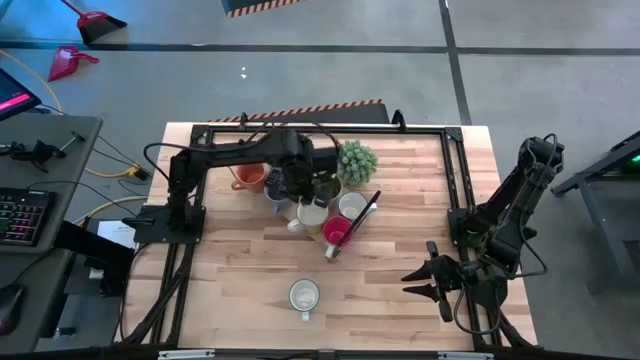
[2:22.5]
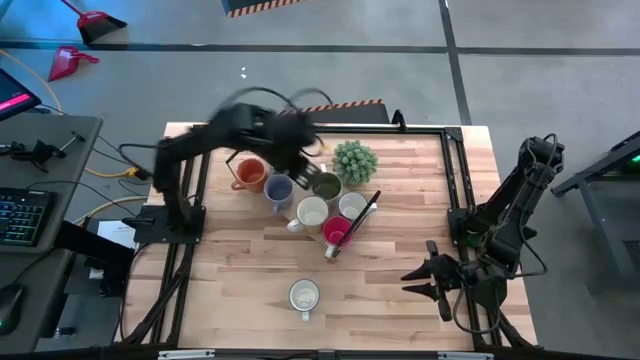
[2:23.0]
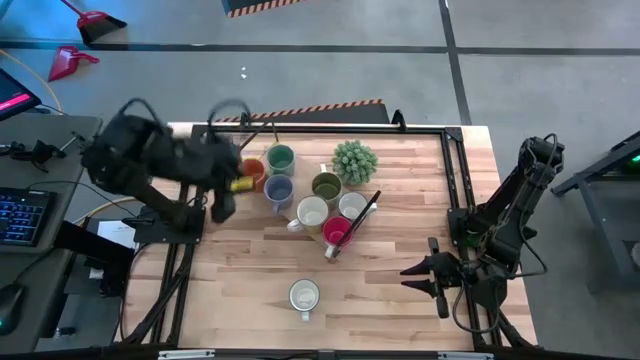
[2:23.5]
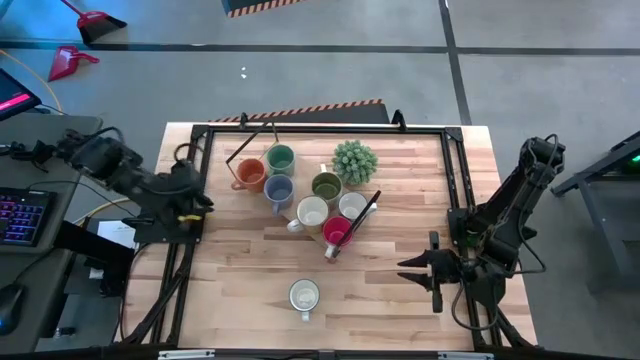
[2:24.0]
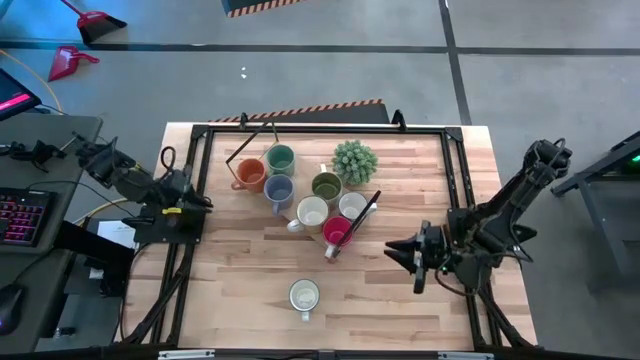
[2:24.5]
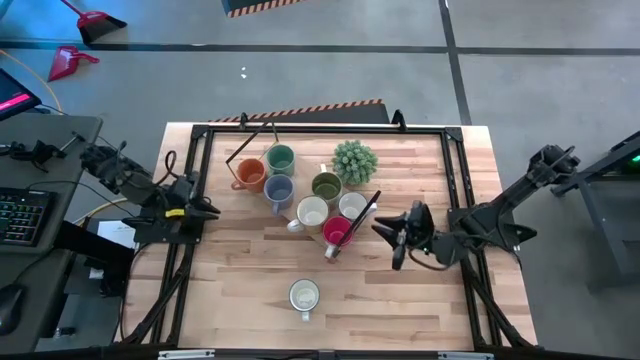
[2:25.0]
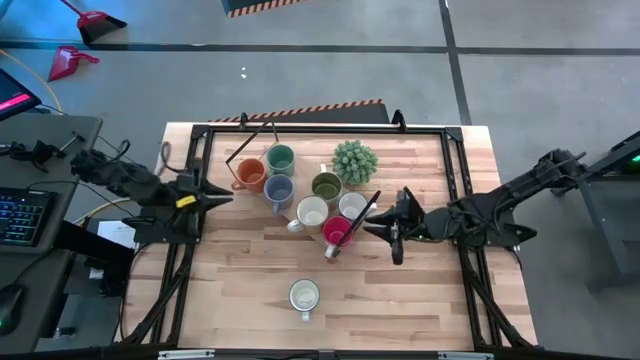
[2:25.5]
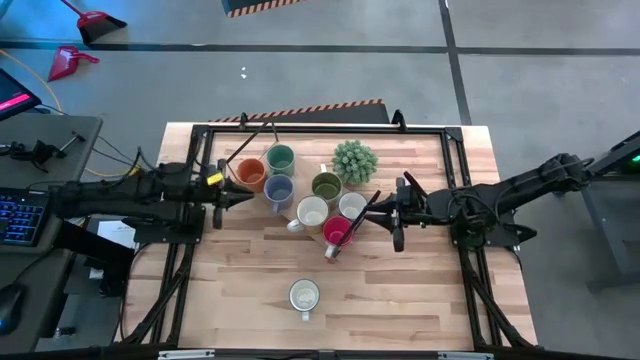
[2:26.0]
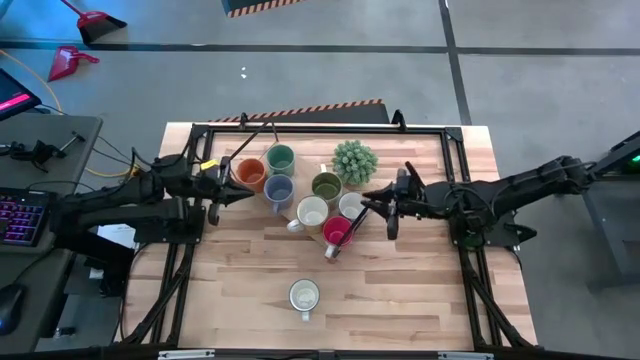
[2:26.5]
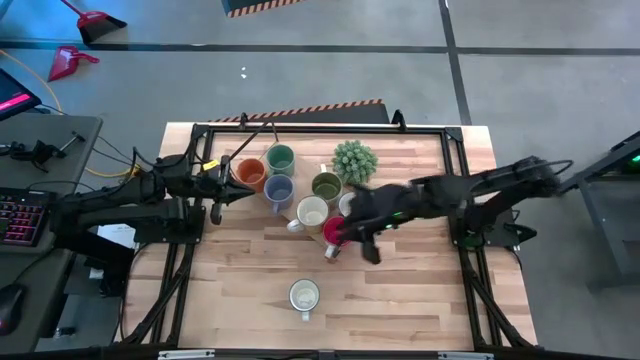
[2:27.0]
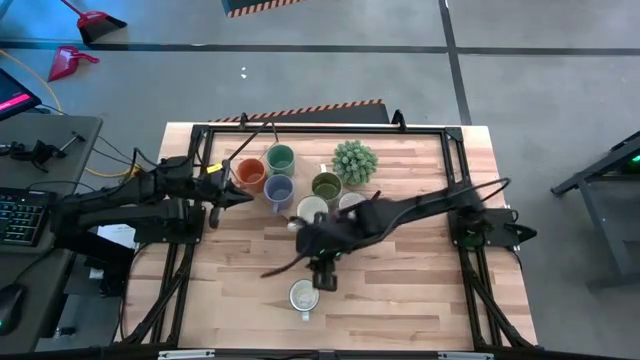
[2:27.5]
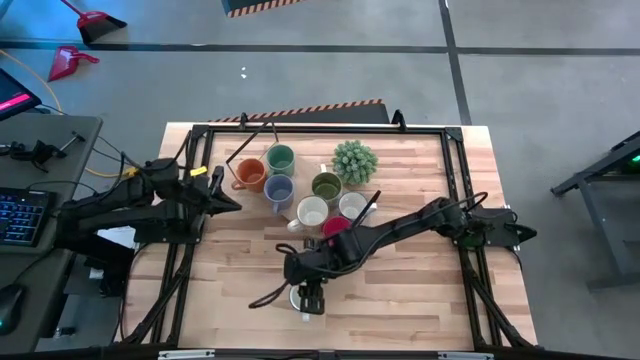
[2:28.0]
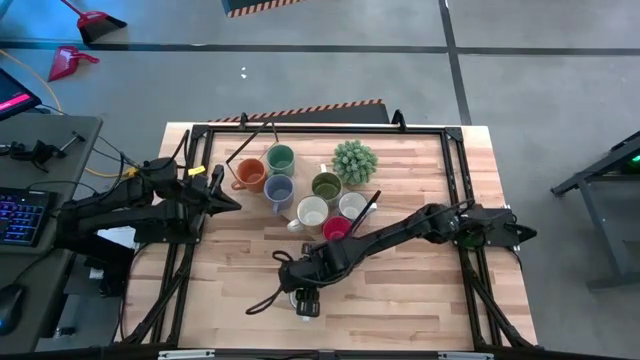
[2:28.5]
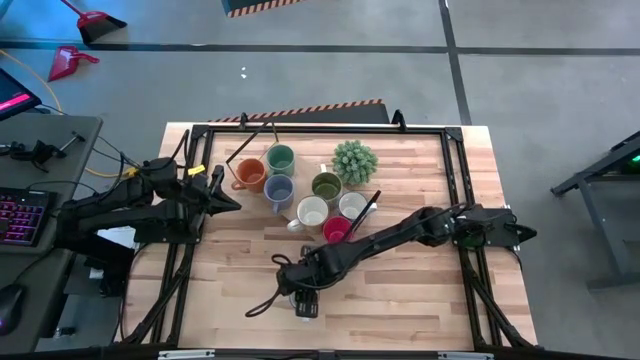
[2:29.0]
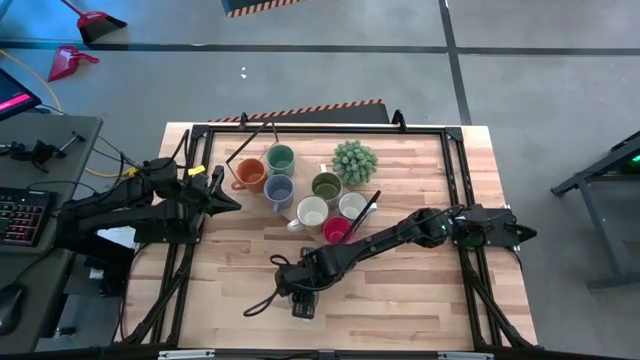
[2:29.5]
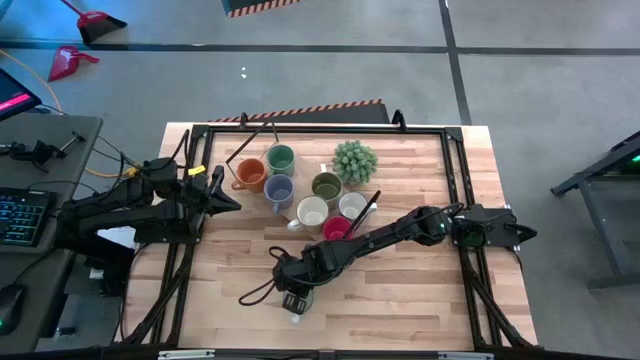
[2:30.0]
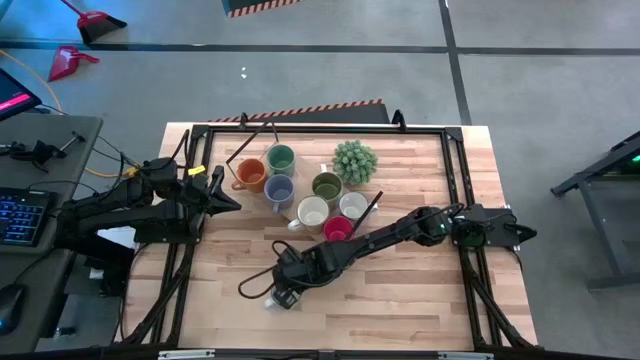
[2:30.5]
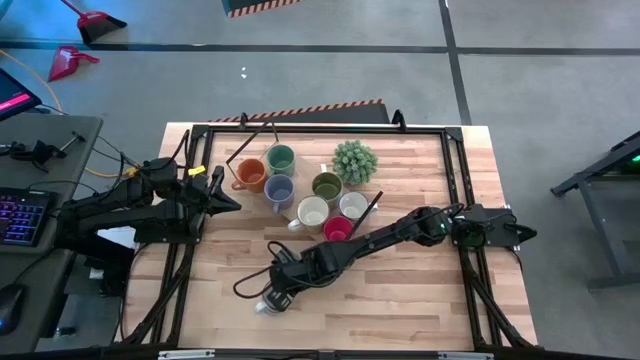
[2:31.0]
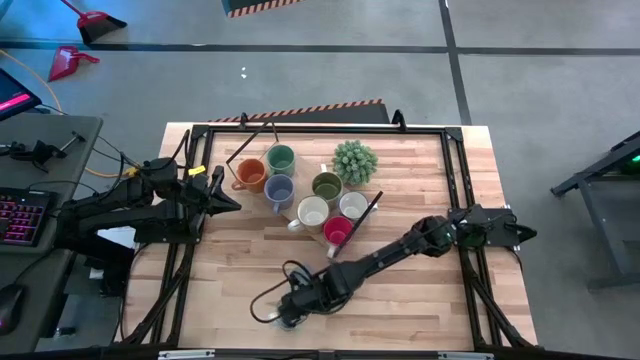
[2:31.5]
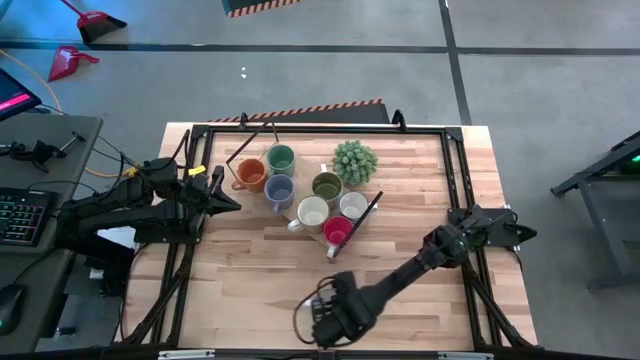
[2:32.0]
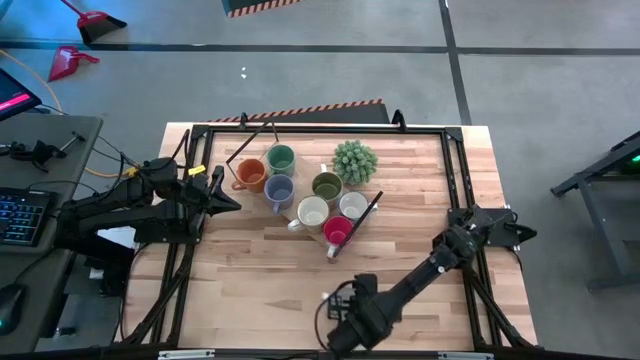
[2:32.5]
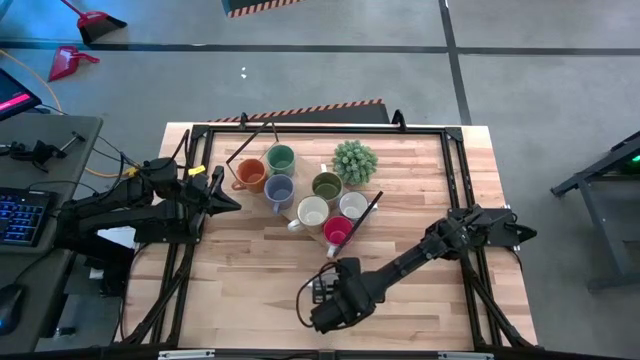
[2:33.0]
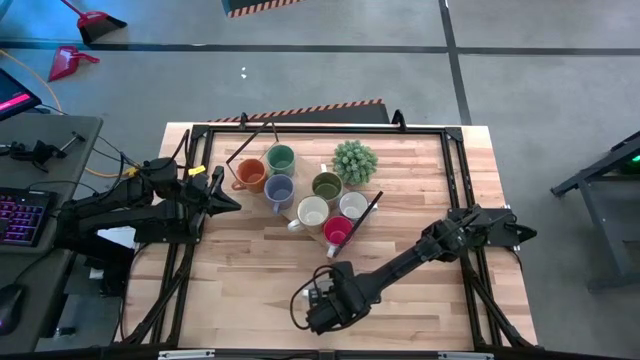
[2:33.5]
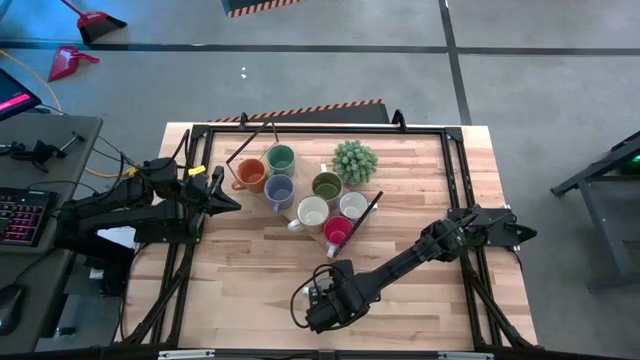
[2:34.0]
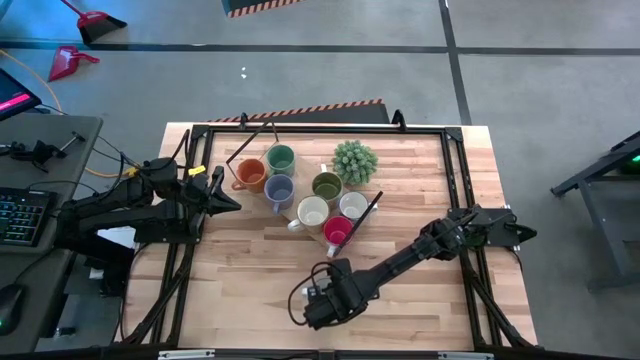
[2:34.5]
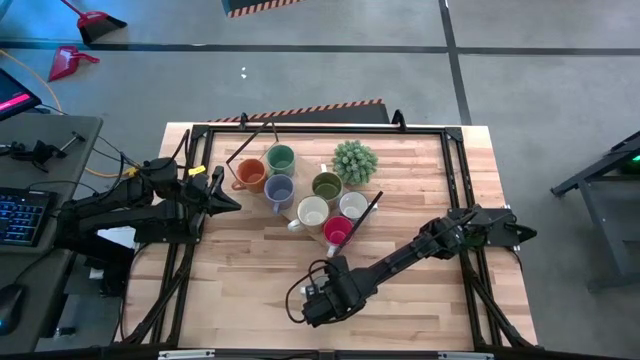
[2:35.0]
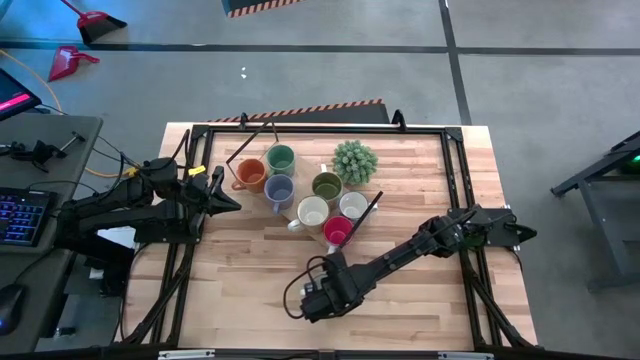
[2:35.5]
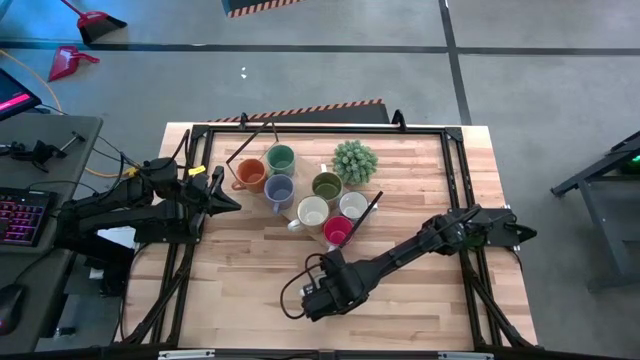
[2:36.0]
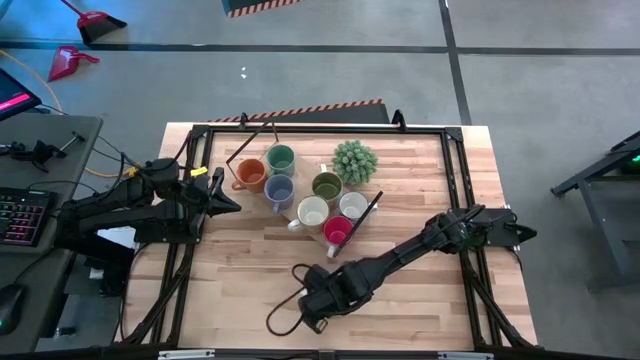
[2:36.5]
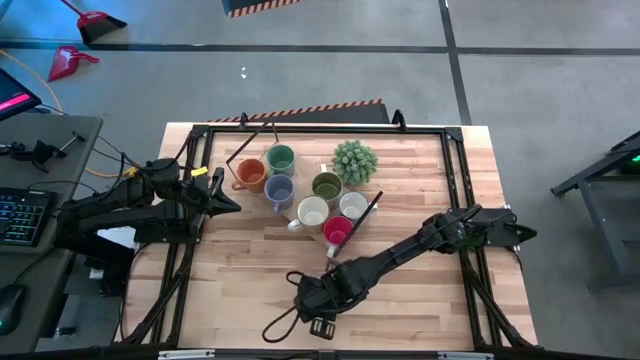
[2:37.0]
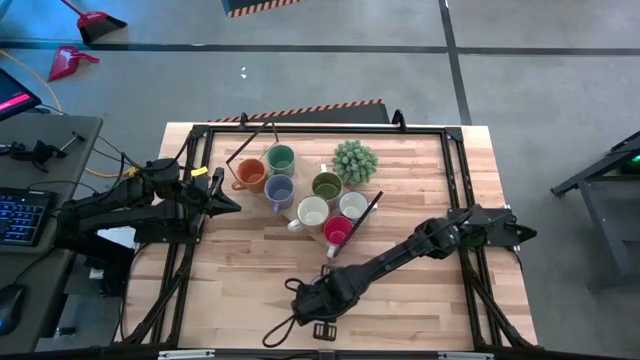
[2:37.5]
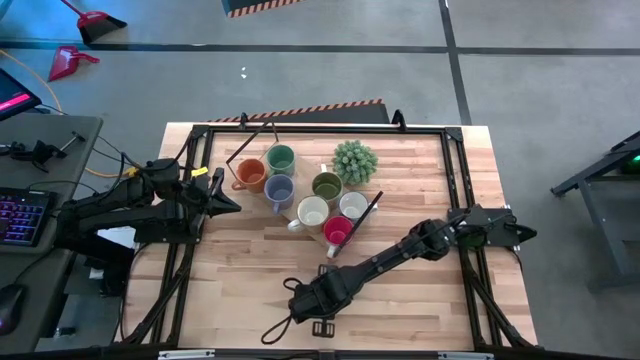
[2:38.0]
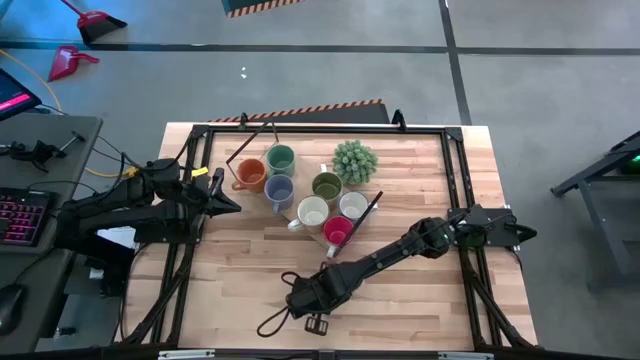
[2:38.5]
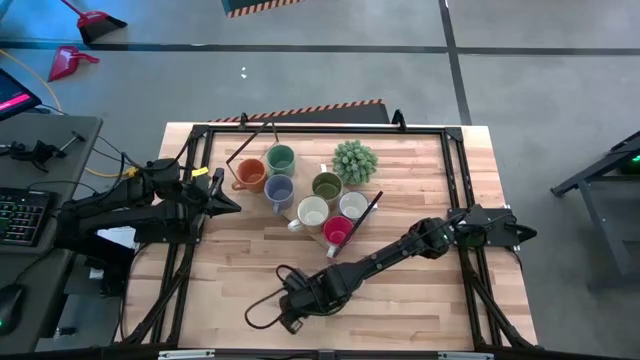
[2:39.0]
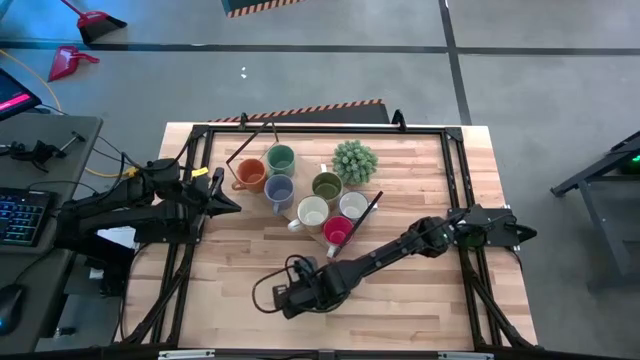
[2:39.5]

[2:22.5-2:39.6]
Task: Place coffee mugs
Put the blue patterned mug on the shelf

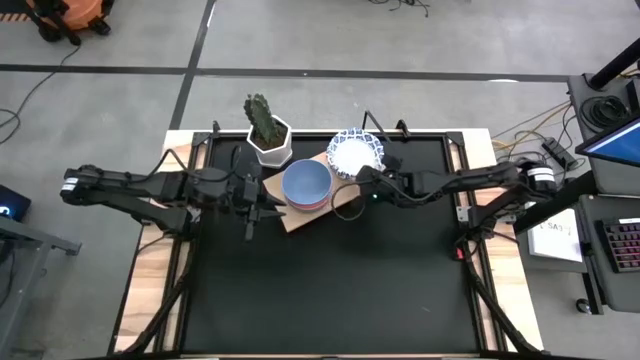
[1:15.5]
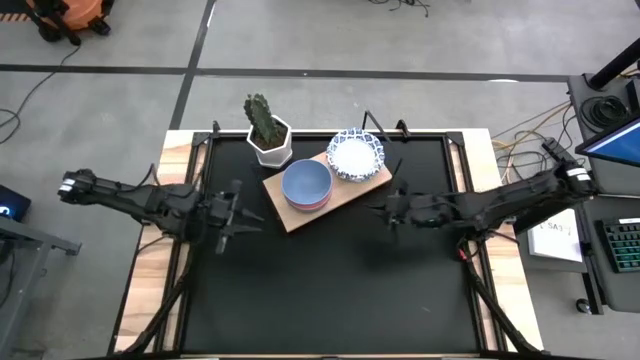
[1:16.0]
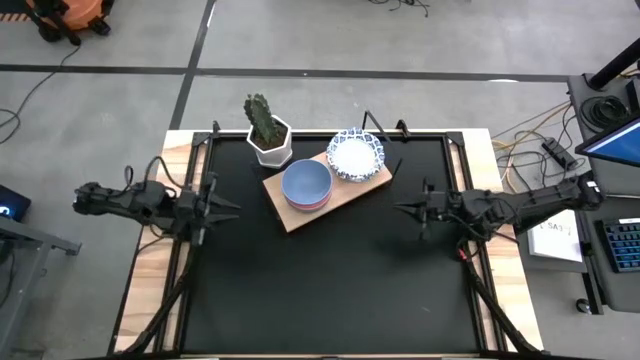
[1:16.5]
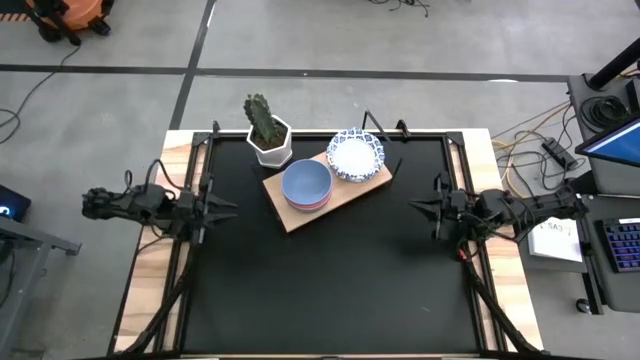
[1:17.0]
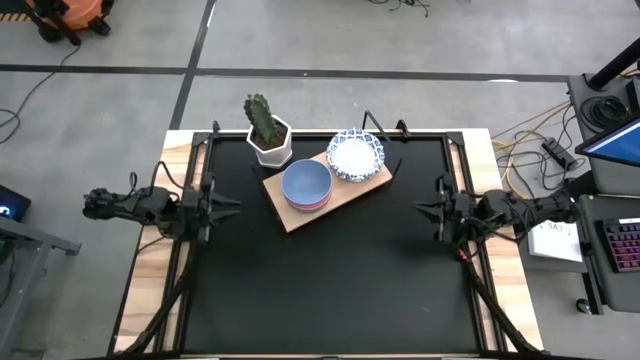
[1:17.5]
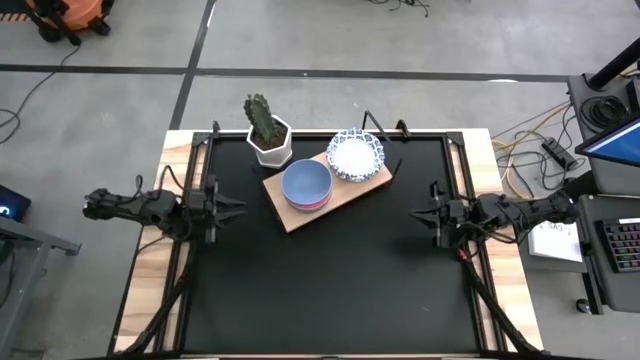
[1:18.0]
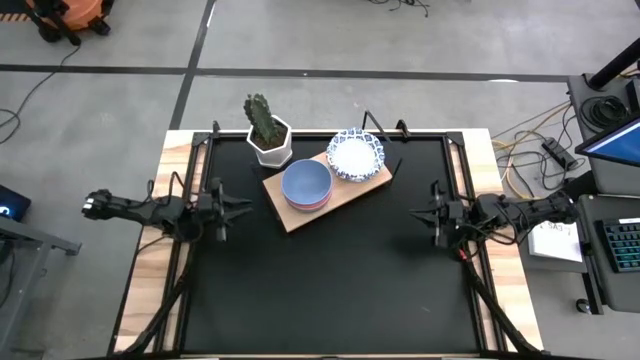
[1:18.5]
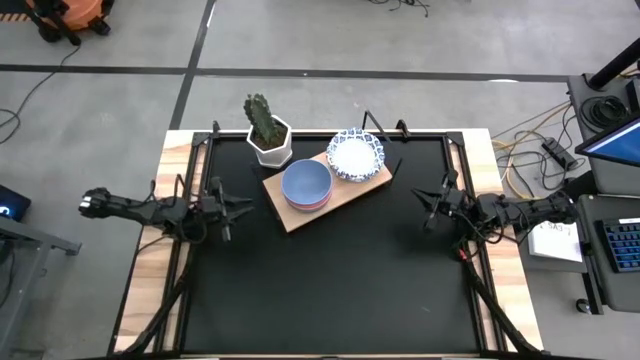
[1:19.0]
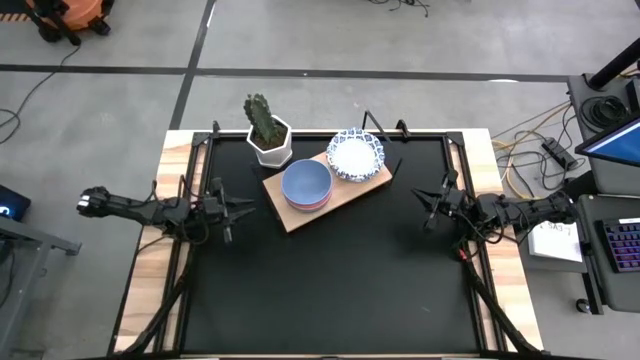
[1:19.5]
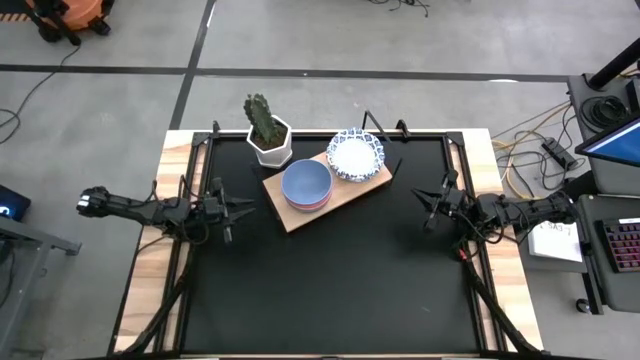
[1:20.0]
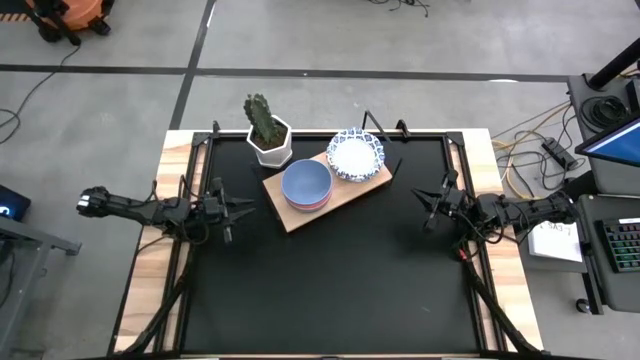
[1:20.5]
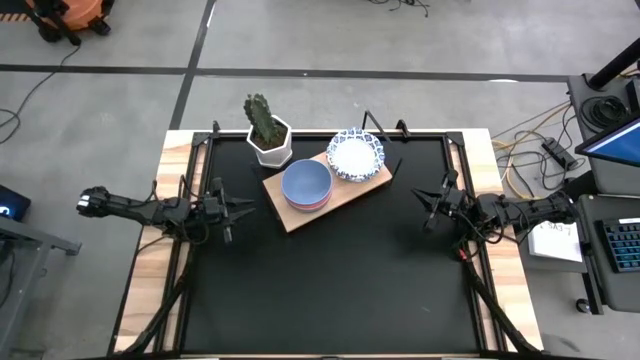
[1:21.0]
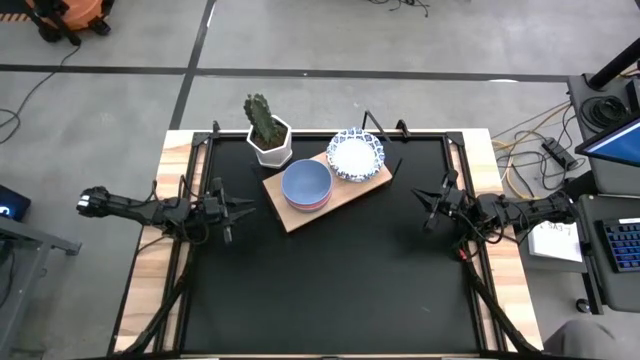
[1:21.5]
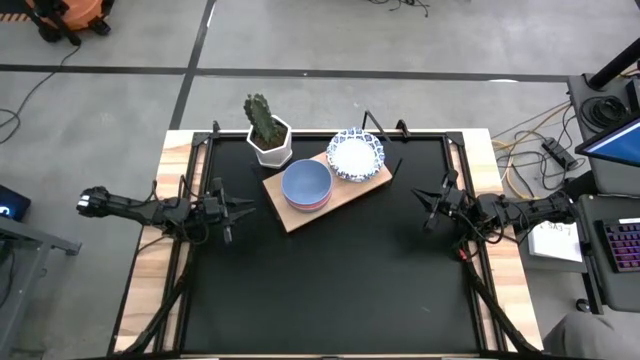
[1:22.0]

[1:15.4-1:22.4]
Task: Place and stack bowls onto a shelf
Return to Home Position
